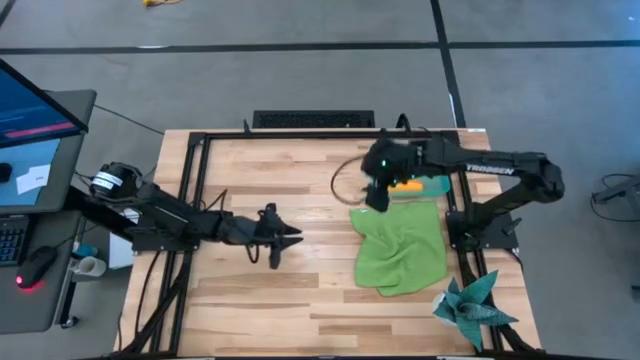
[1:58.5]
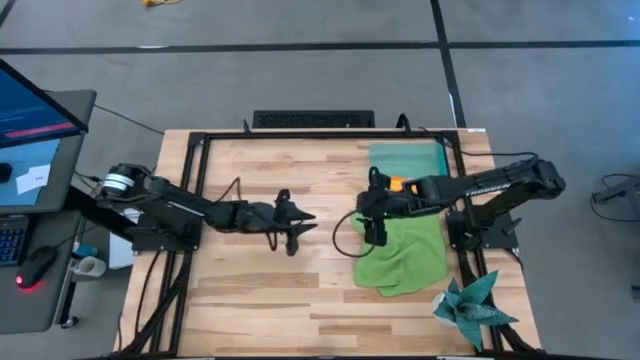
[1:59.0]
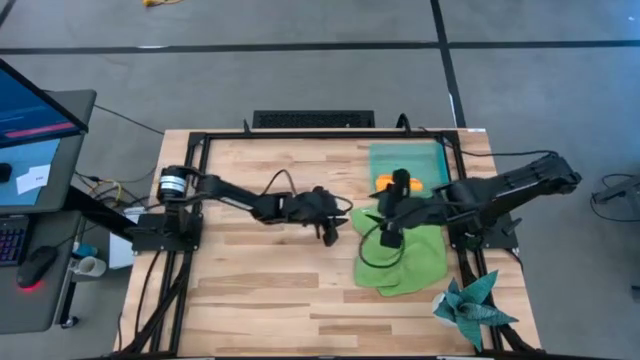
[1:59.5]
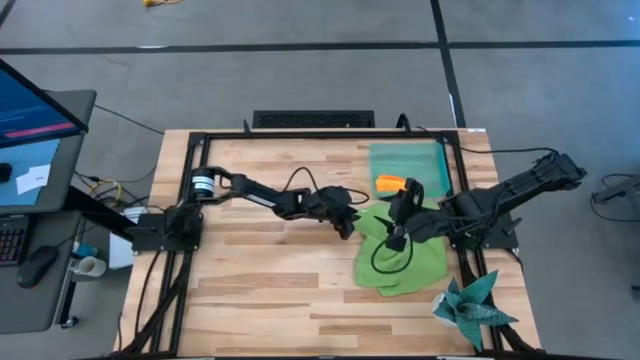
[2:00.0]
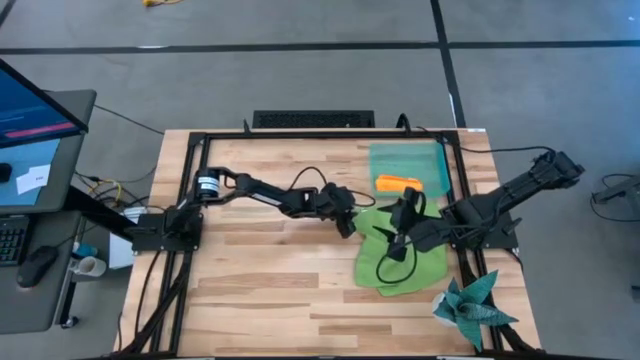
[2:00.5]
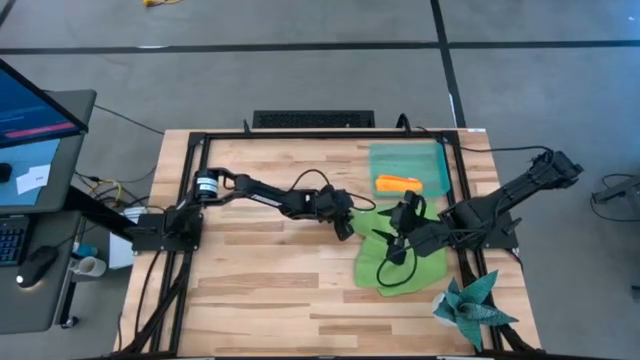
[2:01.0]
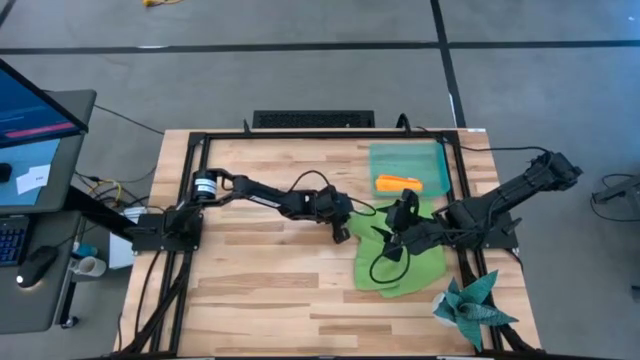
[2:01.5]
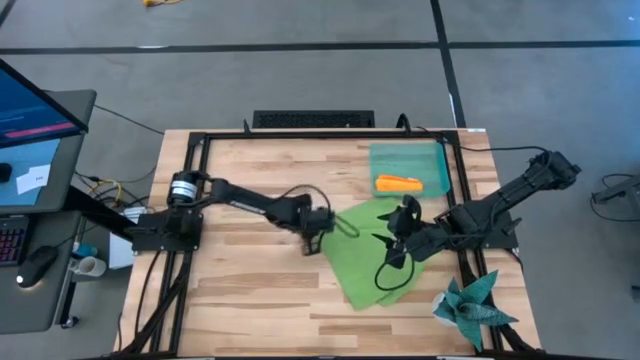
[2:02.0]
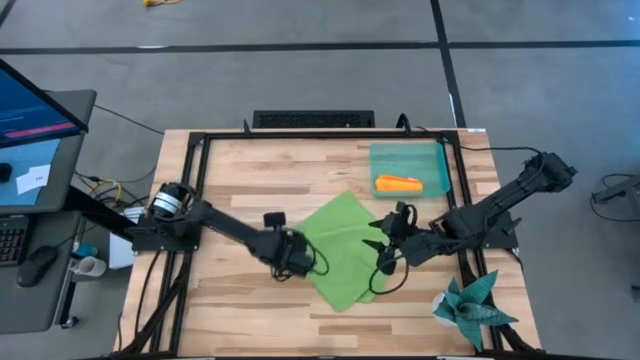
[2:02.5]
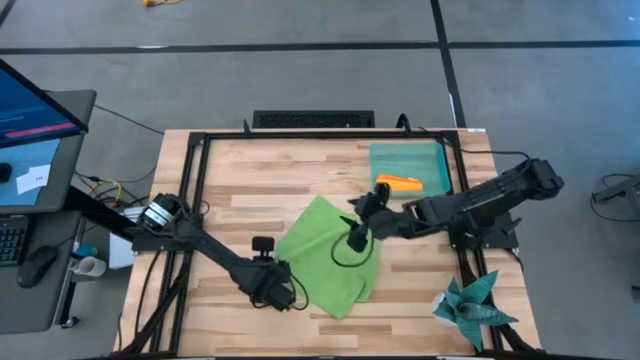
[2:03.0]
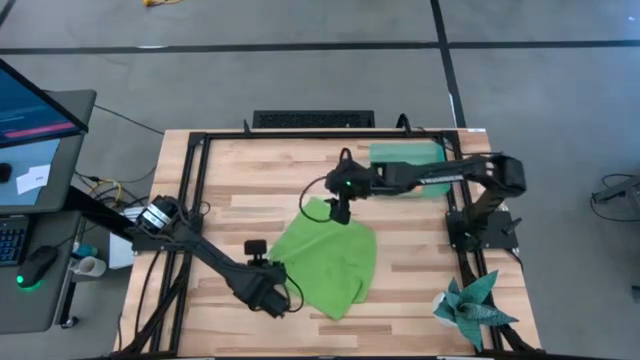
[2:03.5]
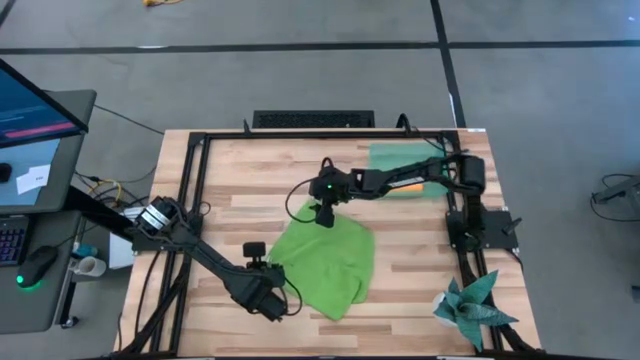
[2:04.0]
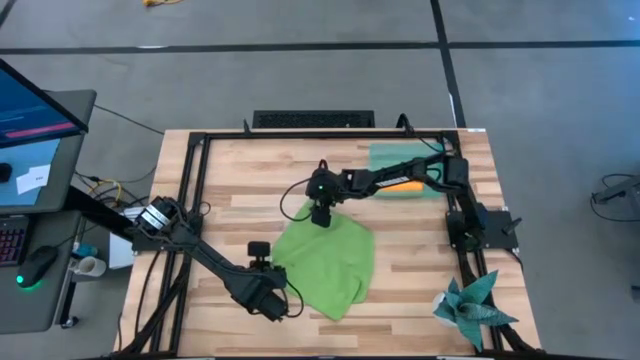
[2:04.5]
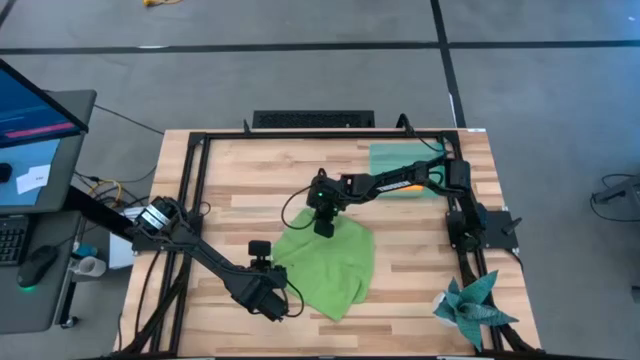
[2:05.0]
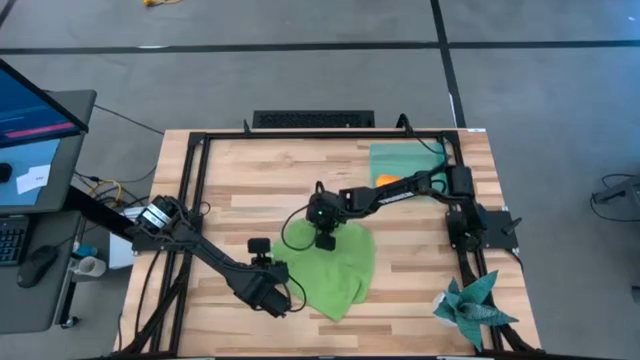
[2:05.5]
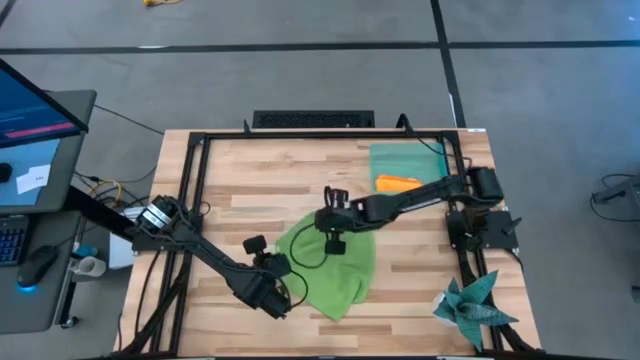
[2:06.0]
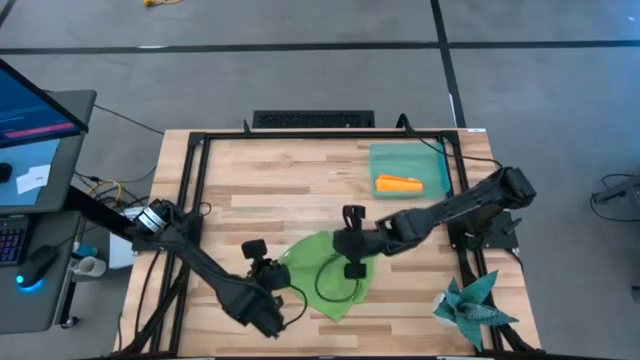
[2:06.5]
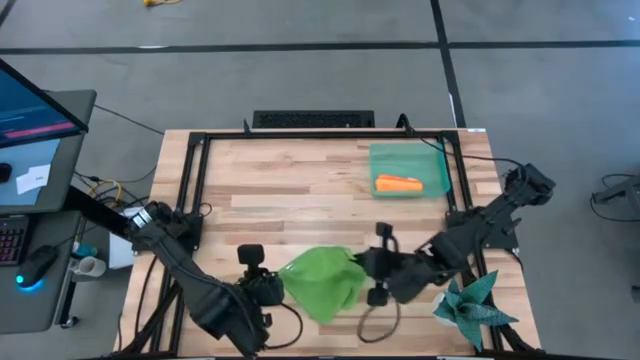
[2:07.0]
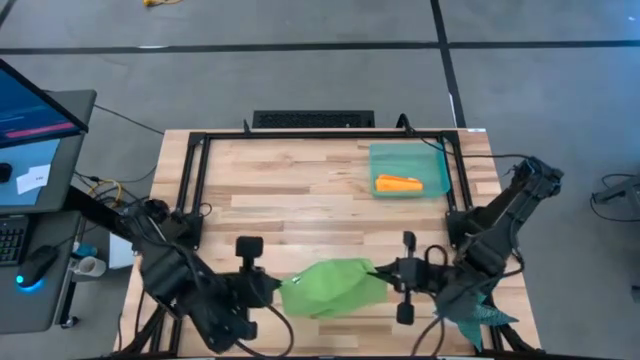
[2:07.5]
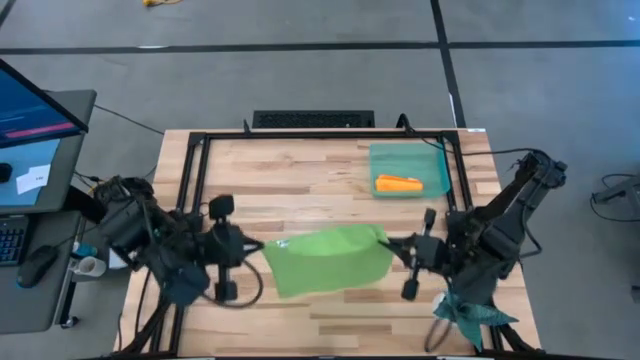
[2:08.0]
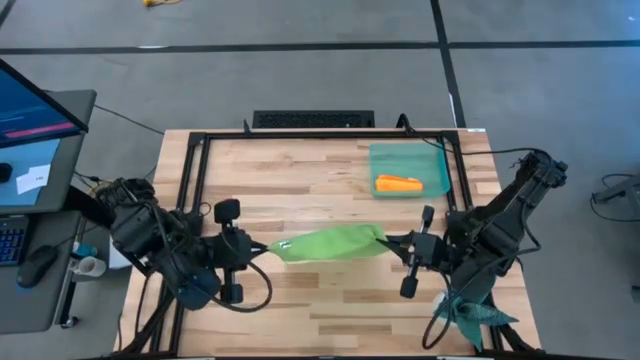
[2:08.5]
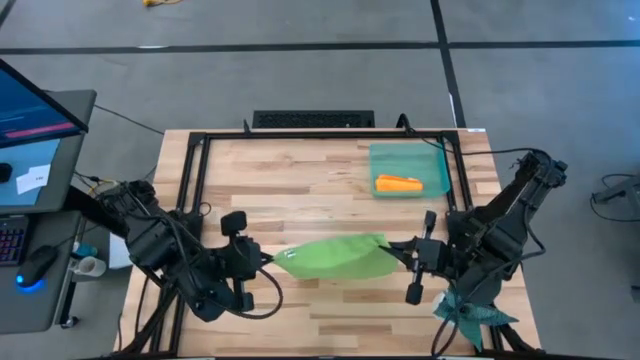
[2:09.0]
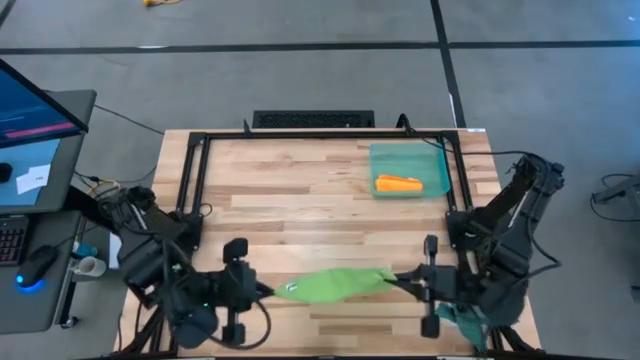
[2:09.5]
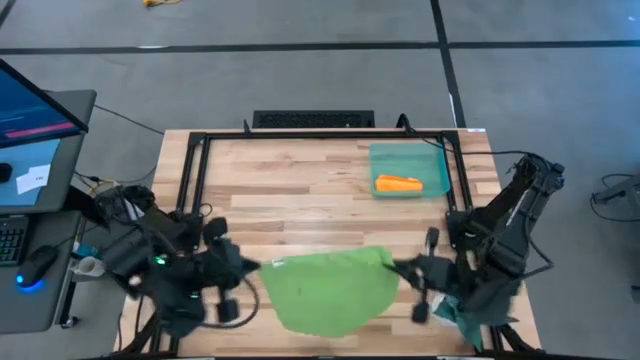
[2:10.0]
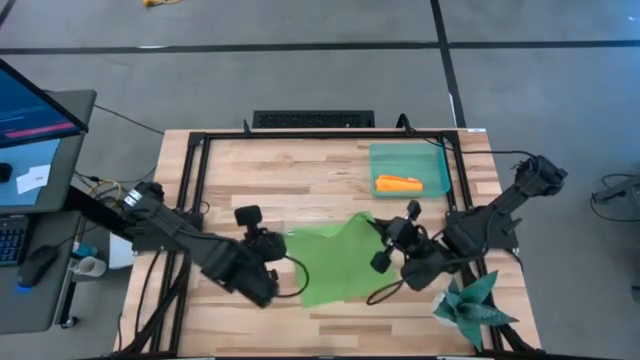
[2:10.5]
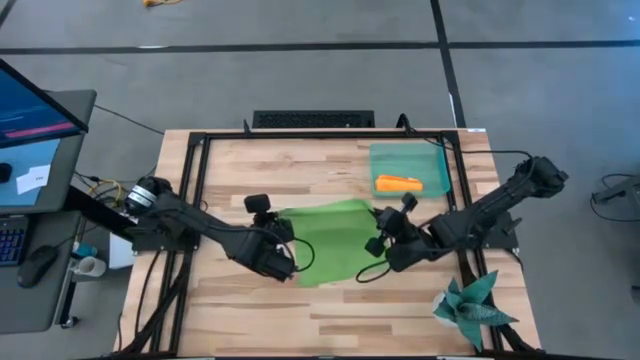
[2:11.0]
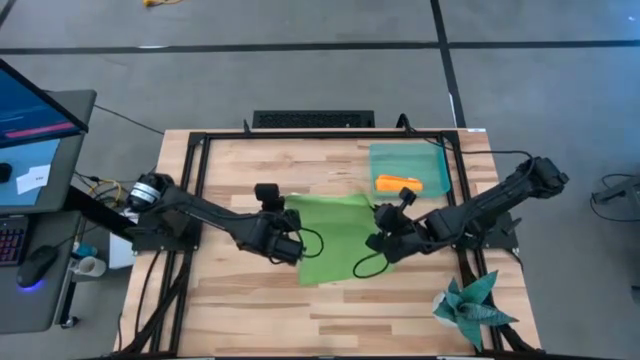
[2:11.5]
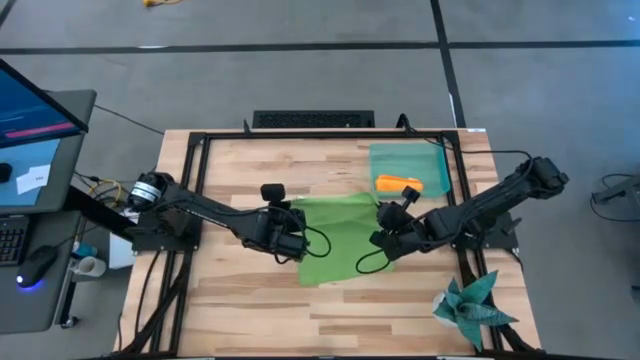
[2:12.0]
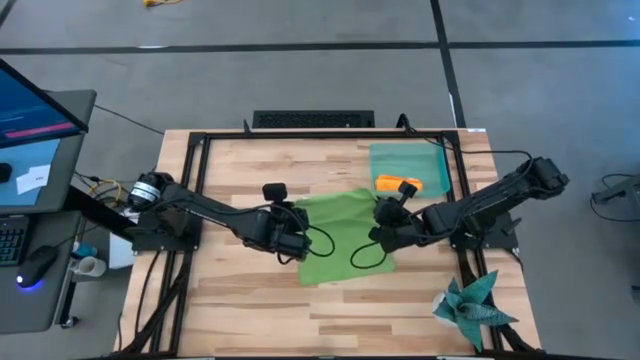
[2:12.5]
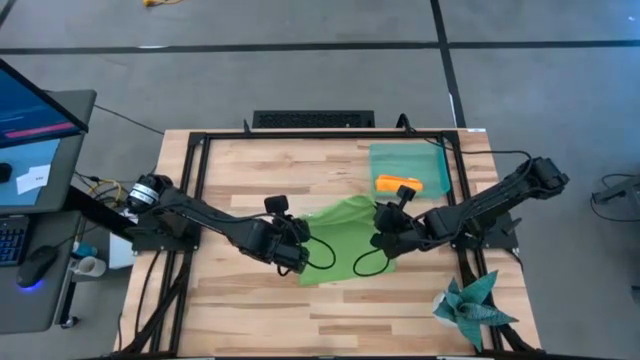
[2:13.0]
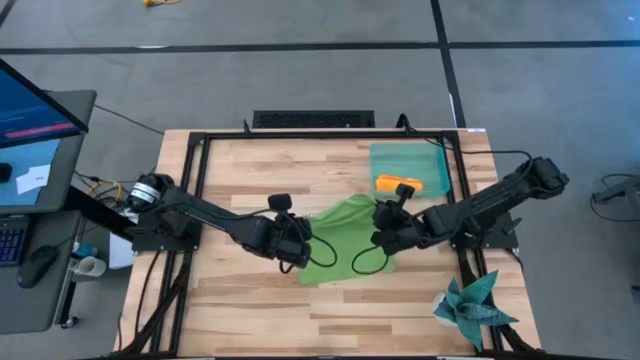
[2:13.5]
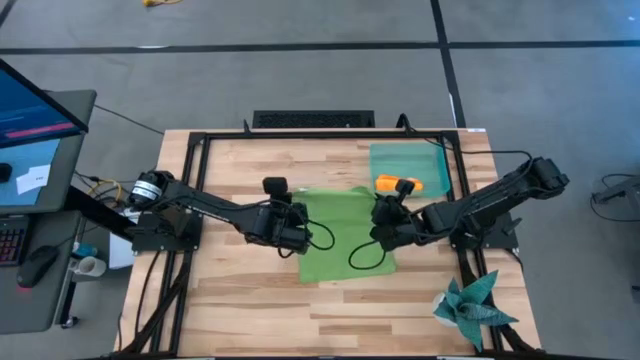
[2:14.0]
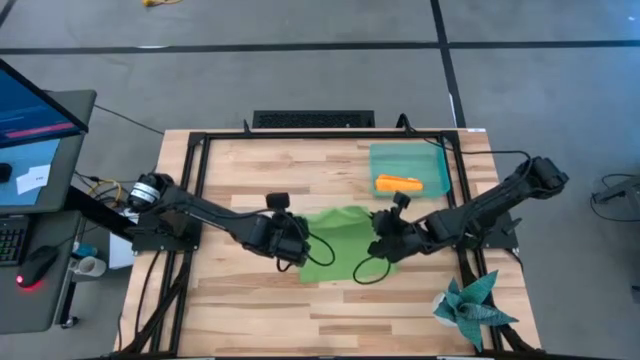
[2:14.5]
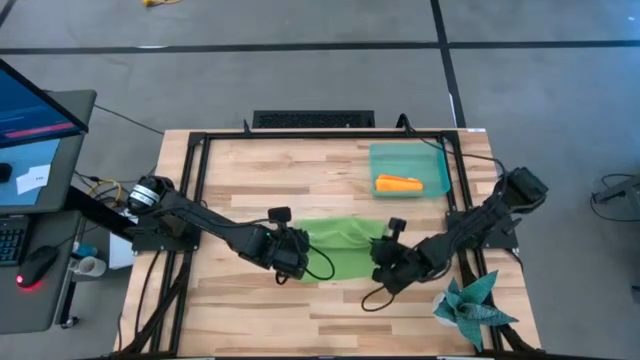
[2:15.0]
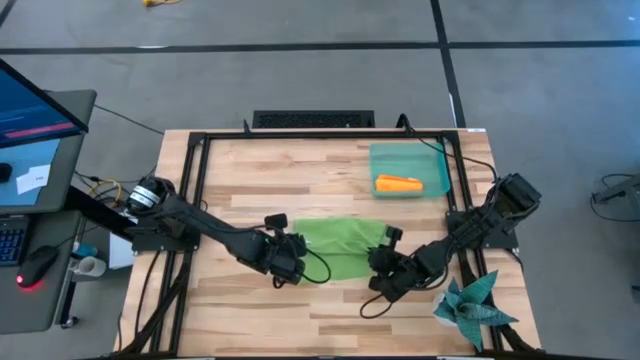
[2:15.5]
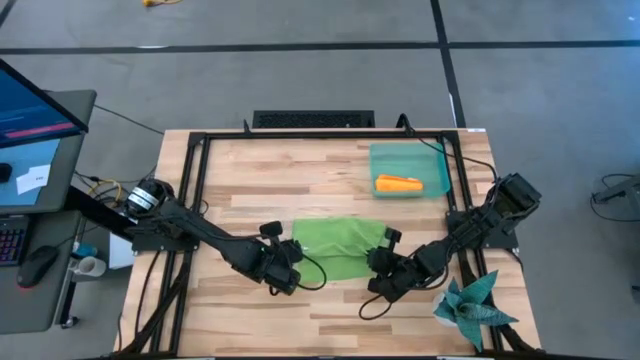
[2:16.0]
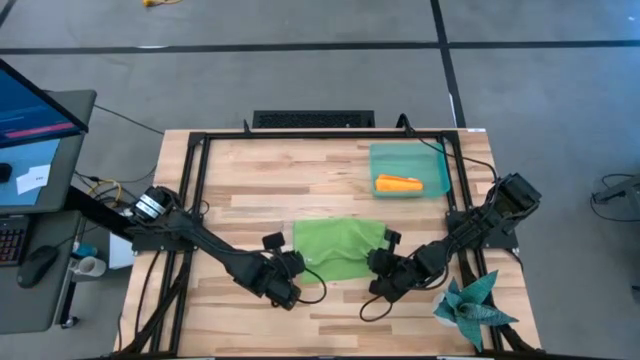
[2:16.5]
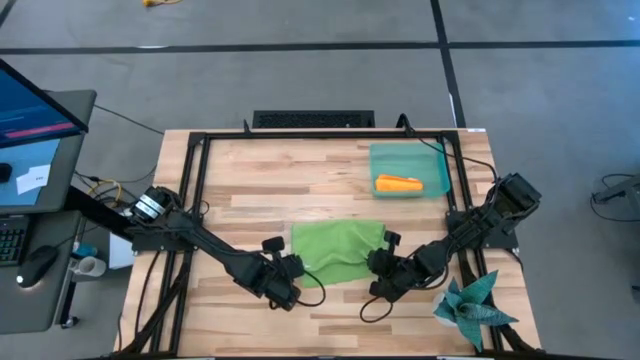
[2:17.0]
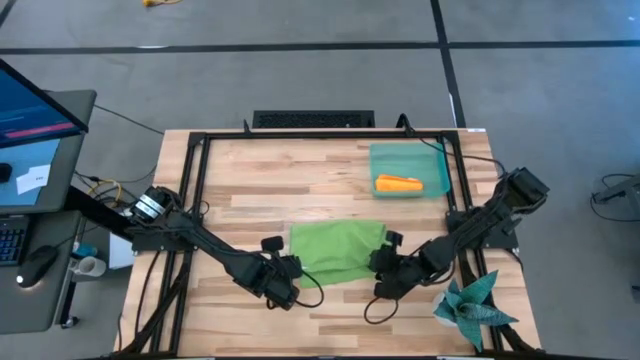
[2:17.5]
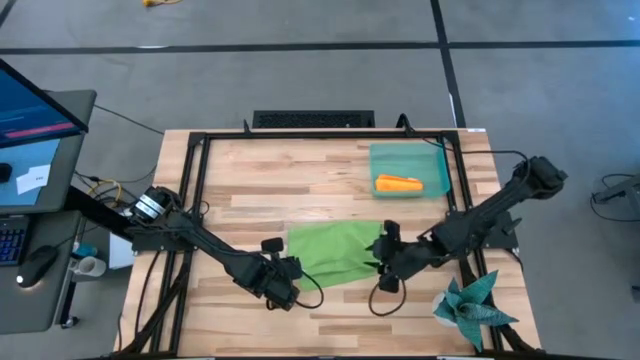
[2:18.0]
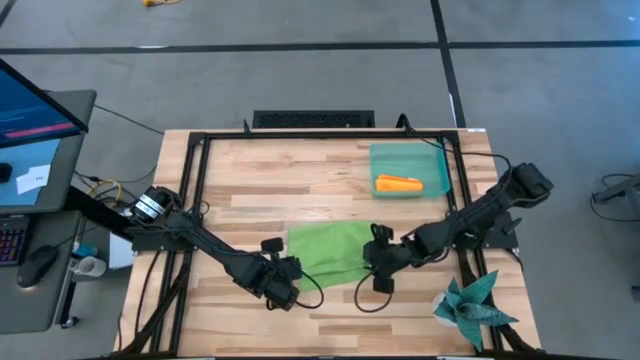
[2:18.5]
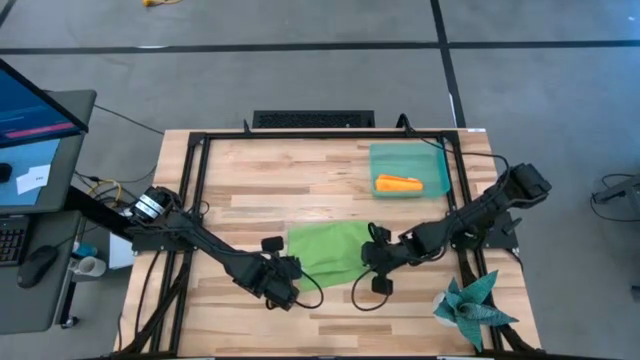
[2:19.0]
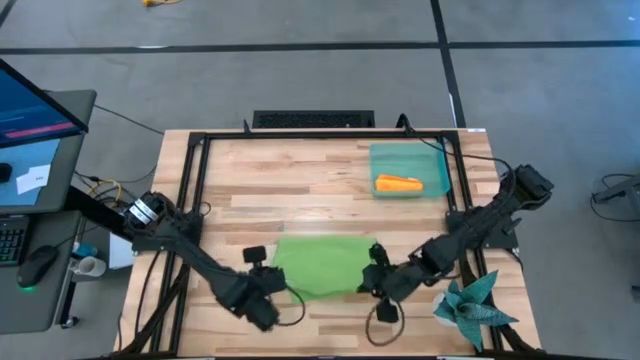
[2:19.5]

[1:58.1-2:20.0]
Task: Roll microfiber towels into tight, uniform cylinder then place into a basket
Fold the green towel
